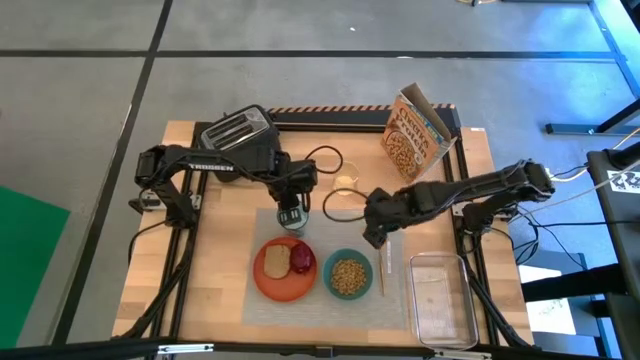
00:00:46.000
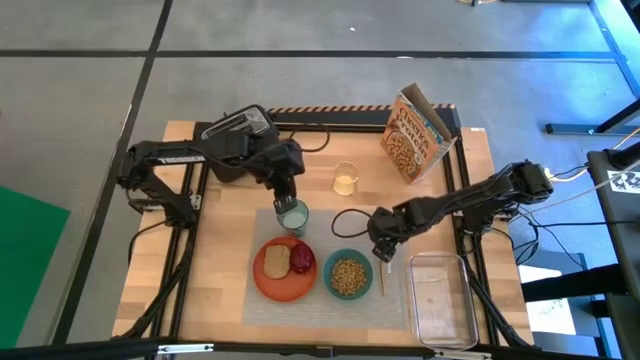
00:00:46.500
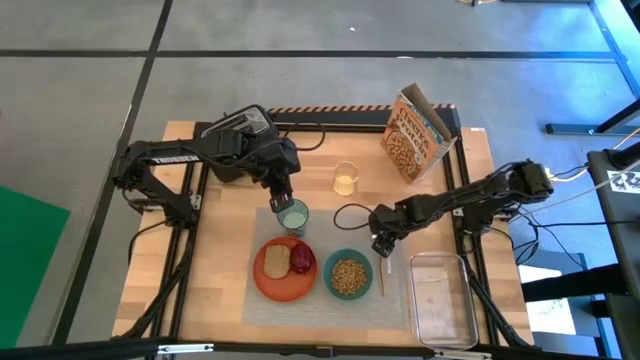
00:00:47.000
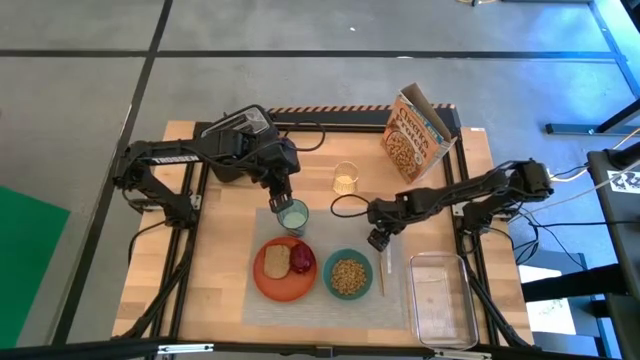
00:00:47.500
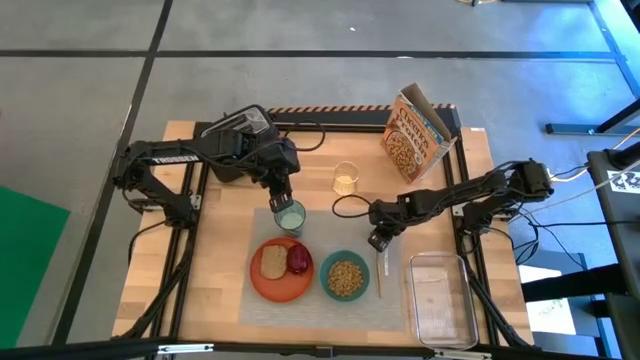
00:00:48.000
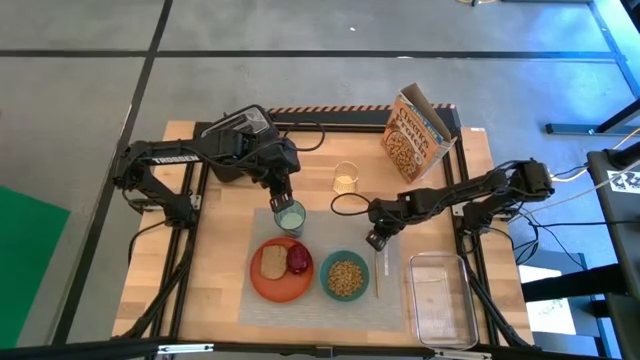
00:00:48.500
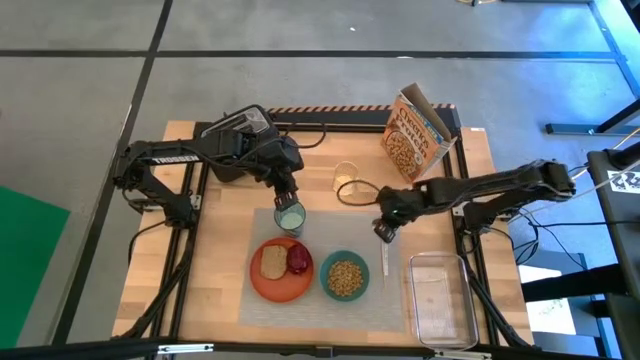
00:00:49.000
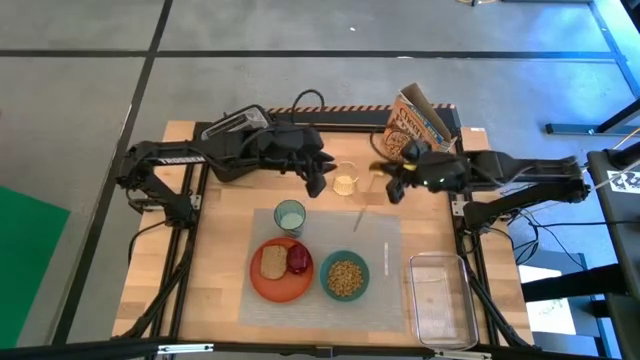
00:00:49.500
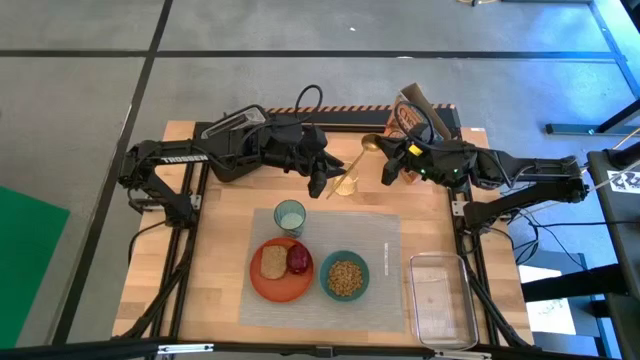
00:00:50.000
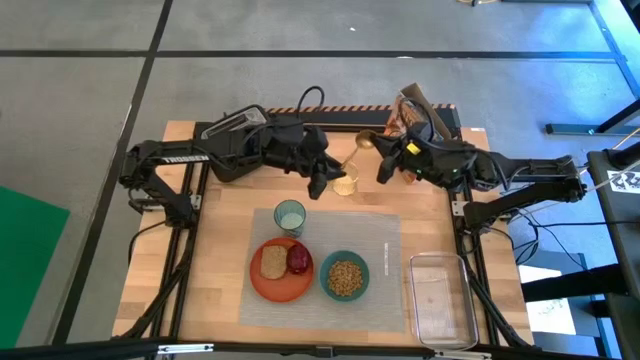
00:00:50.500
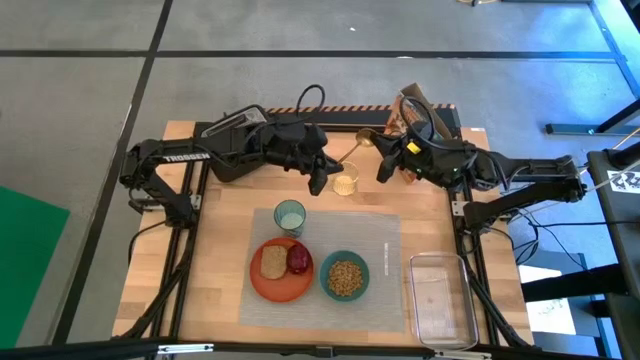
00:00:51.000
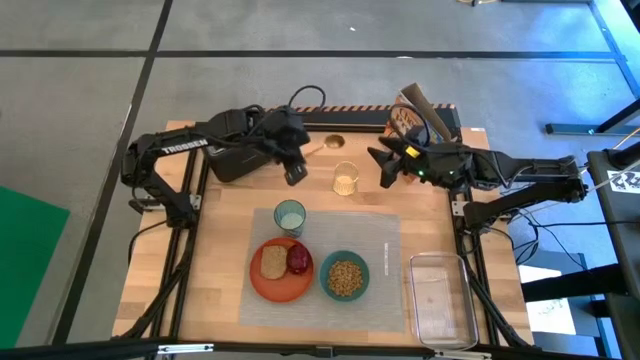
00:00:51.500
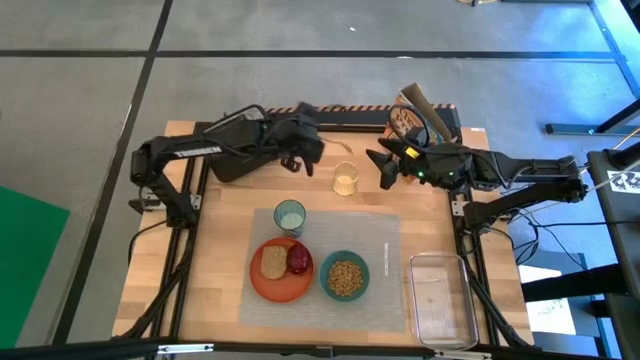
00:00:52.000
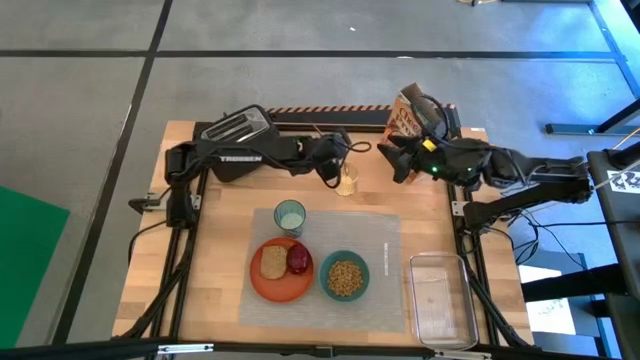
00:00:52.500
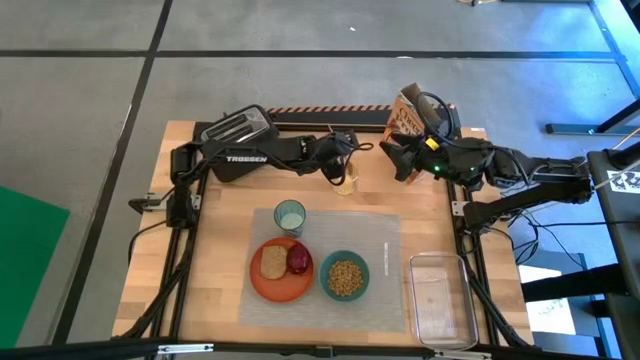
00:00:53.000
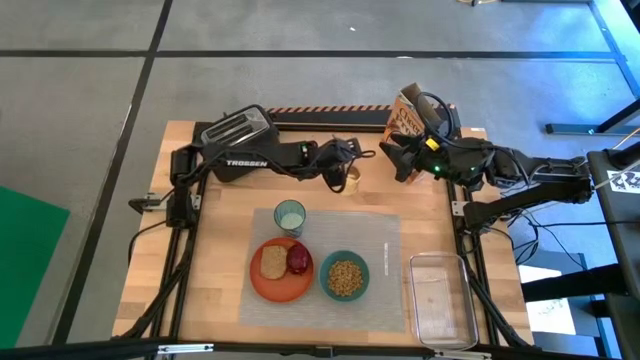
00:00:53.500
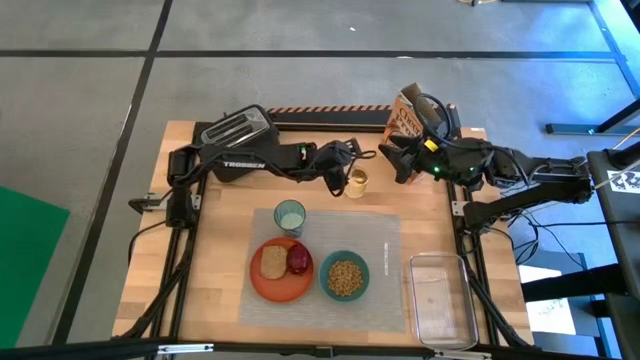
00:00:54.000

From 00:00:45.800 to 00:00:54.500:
Task: Arrange a breakfast setting
Put the spoon in the cup

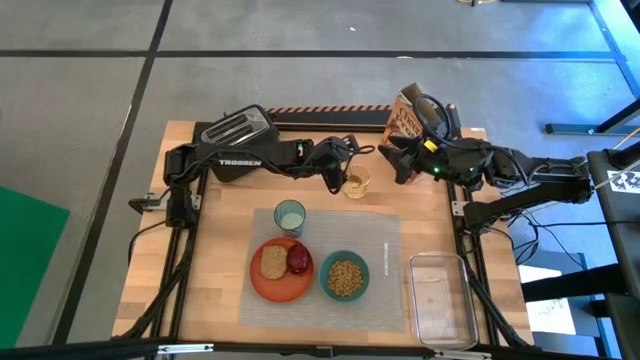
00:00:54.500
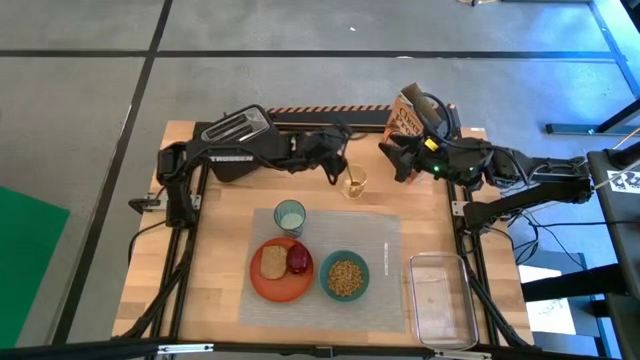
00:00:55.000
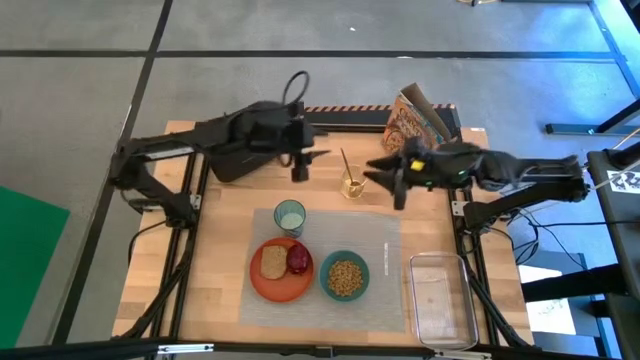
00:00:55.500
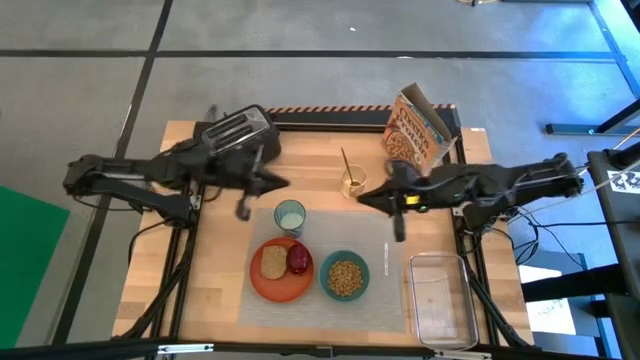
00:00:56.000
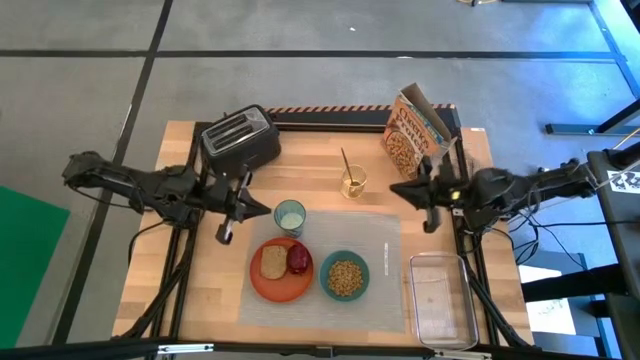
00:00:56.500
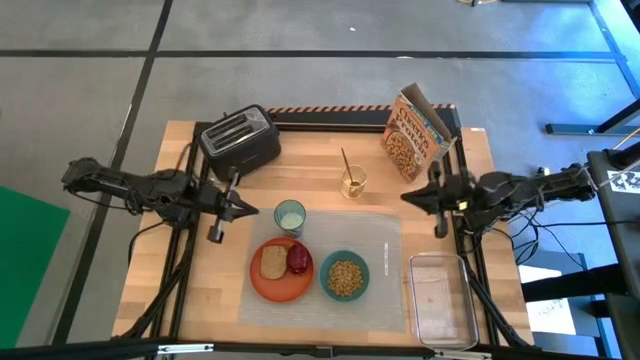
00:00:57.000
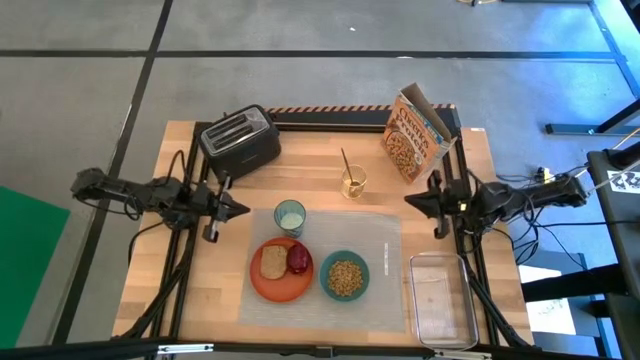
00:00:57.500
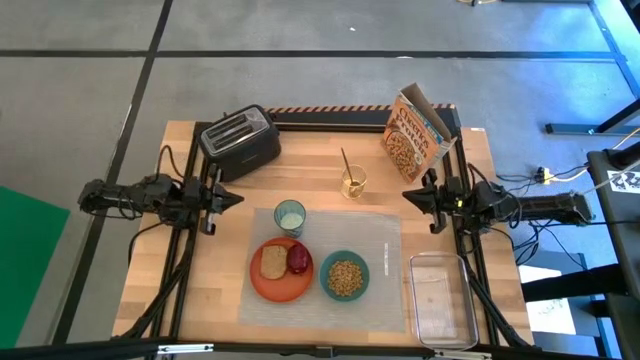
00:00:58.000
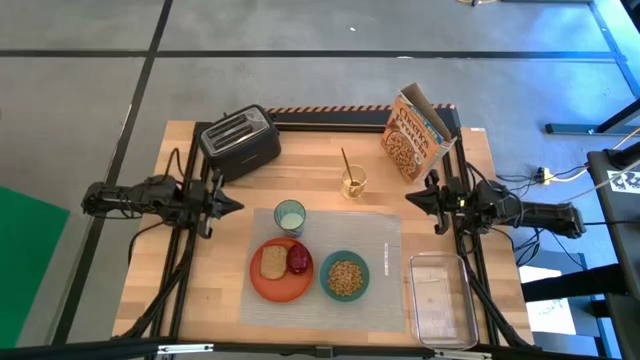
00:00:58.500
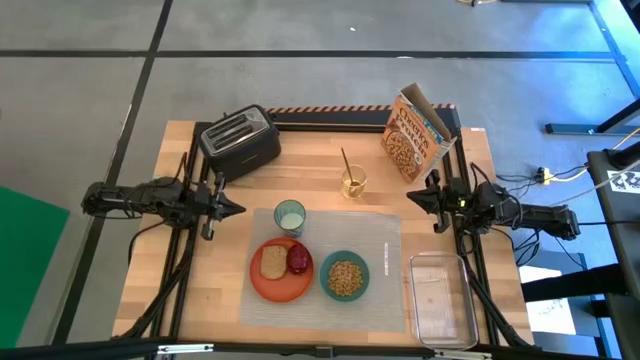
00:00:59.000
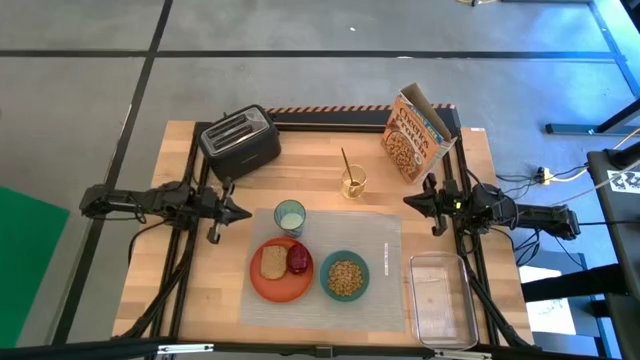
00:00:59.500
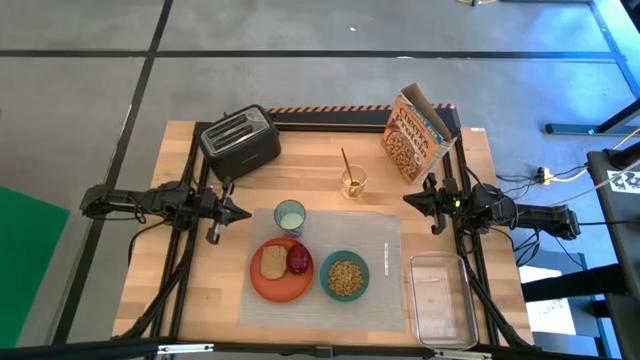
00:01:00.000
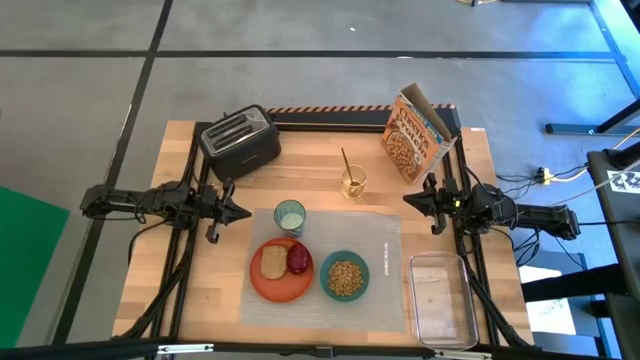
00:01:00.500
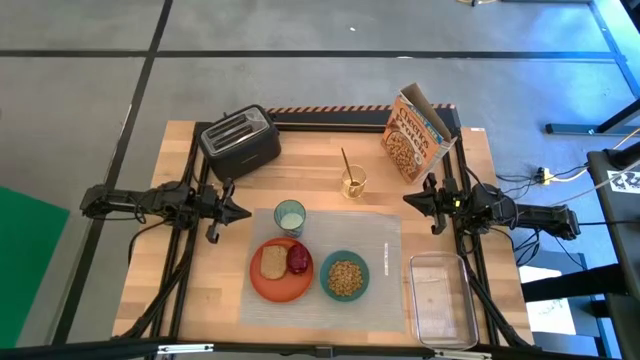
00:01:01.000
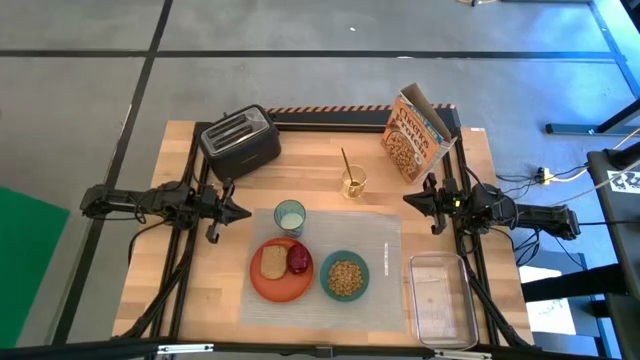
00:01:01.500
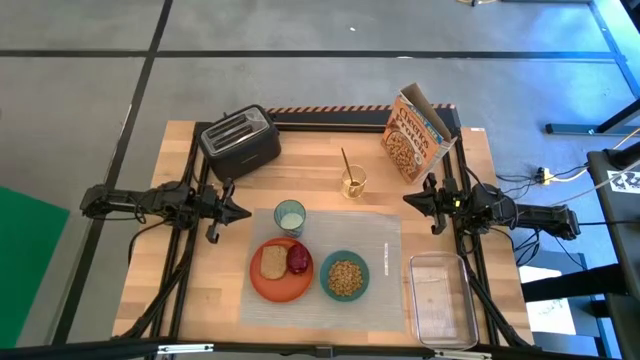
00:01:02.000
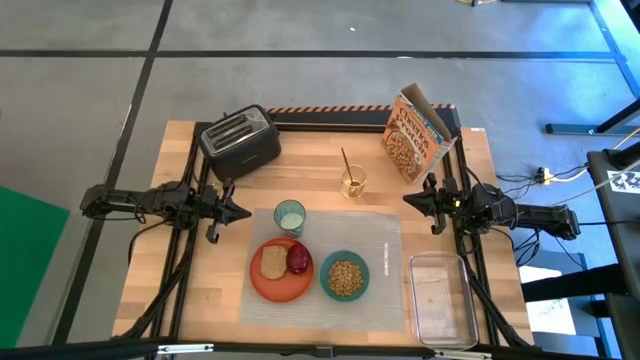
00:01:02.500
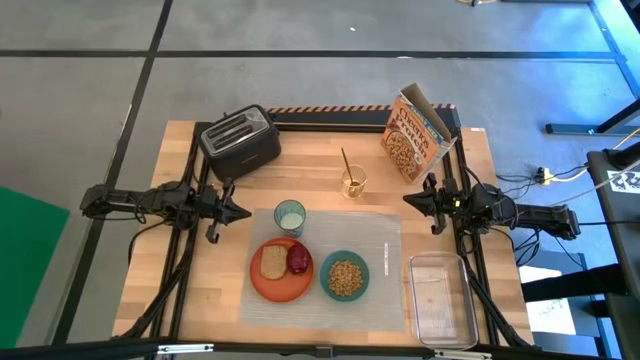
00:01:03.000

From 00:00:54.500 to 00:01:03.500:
Return to Home Position

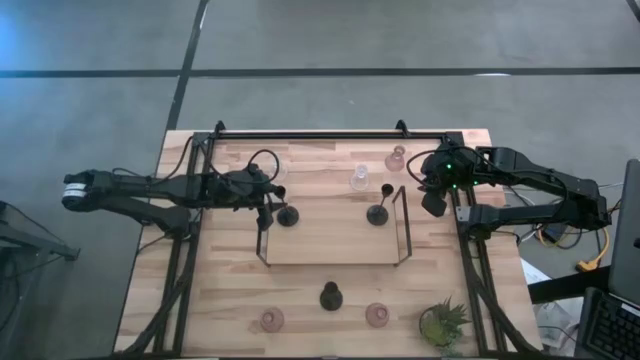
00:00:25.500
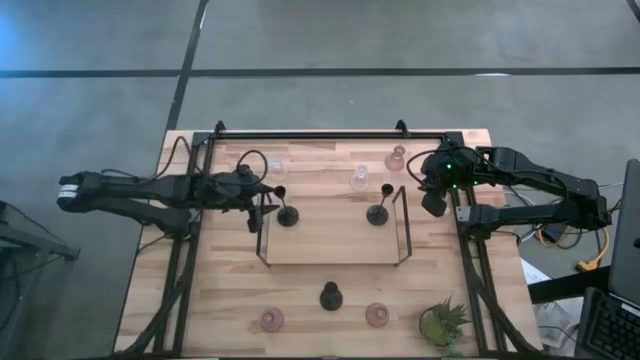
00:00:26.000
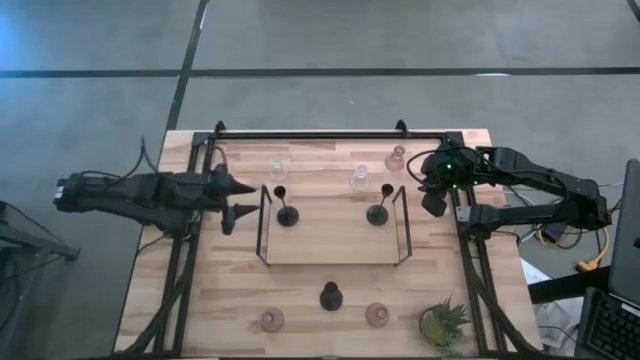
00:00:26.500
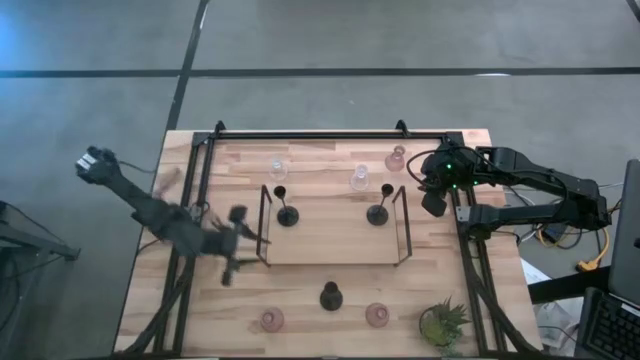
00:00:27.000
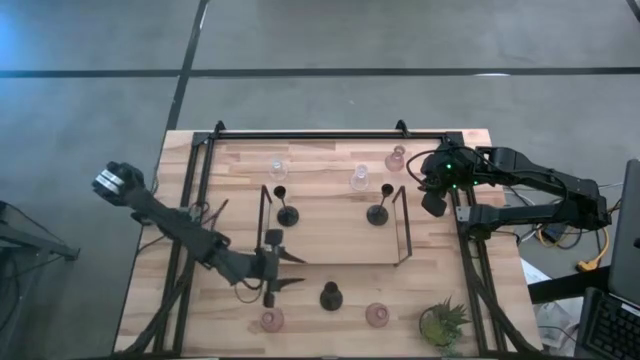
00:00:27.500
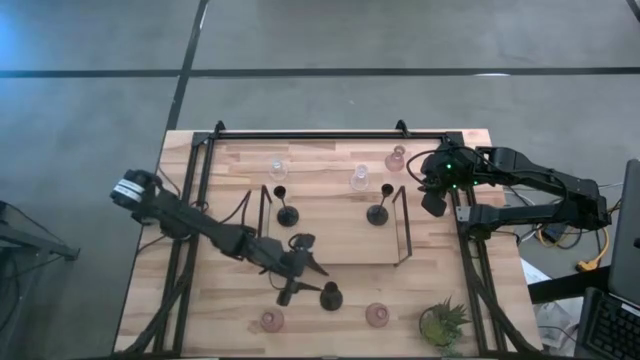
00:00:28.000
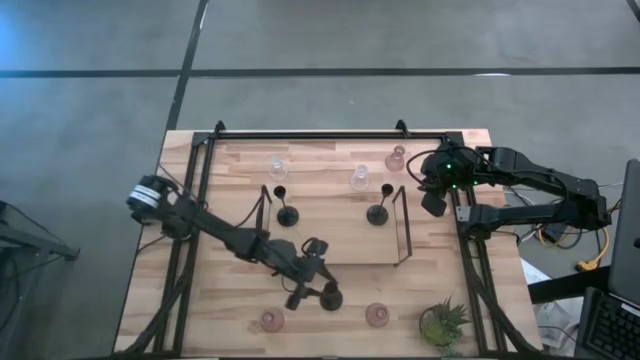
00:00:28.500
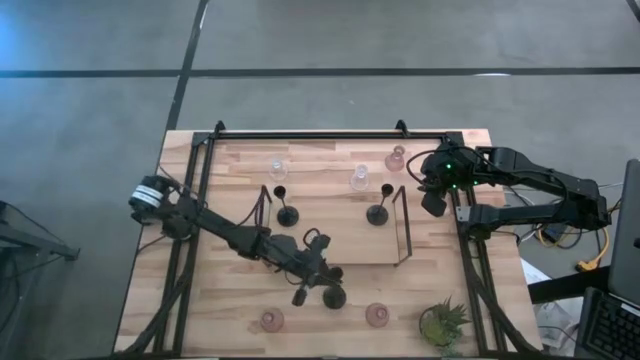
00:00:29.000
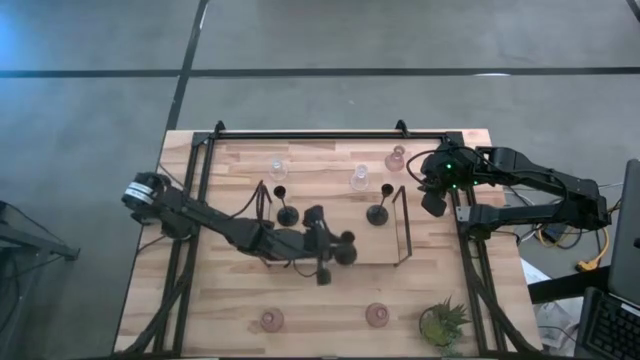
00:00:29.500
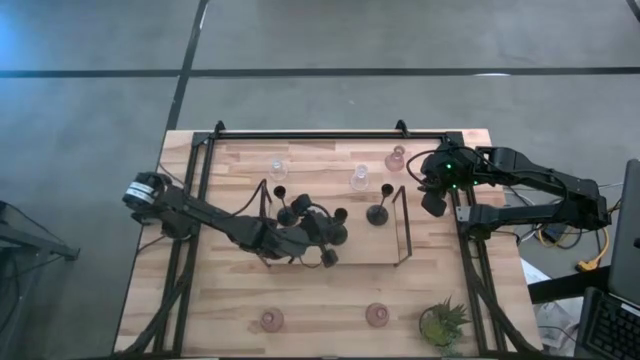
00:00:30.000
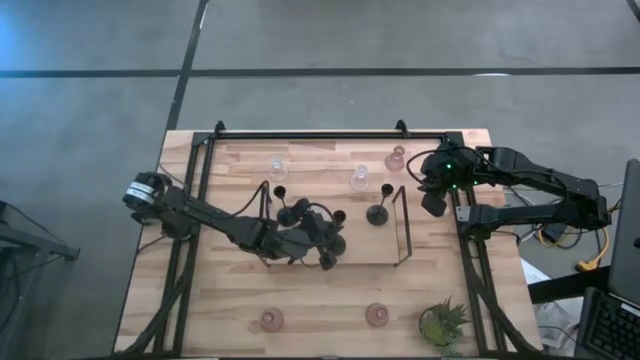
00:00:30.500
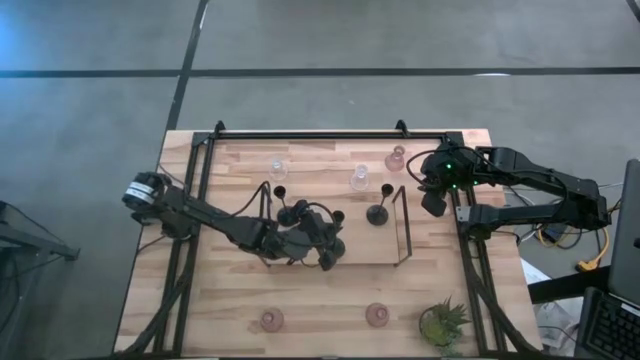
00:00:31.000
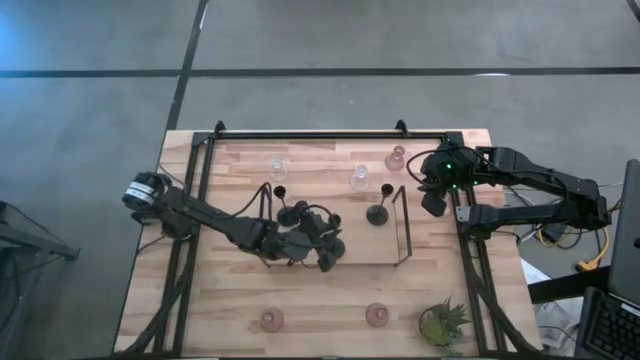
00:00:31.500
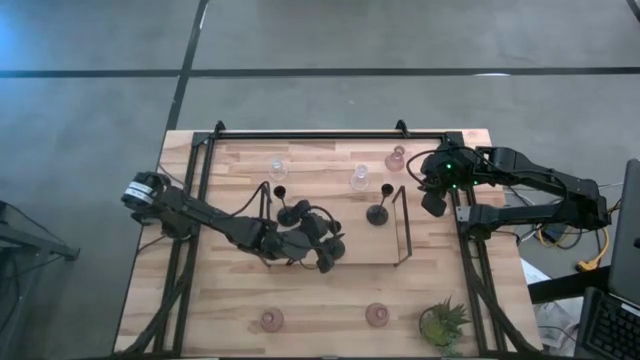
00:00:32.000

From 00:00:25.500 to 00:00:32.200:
Task: Pick & Place candle stick holders
Put the black candle holder on the shelf
